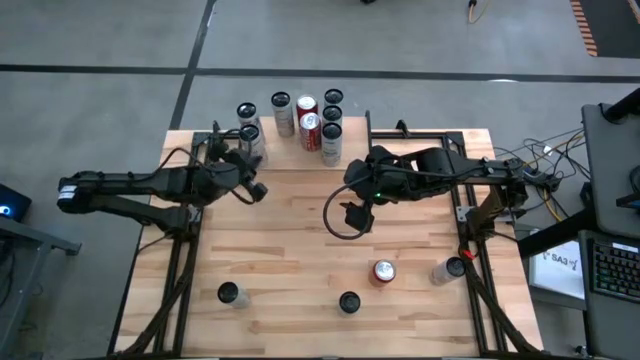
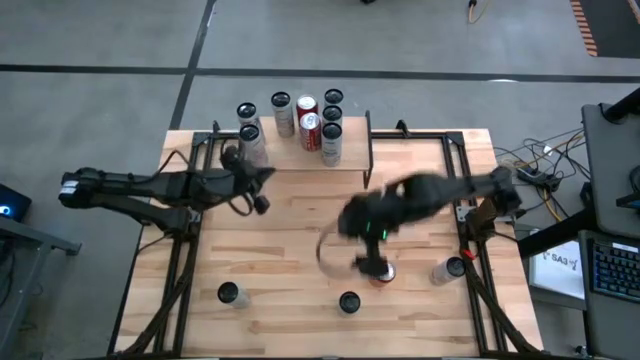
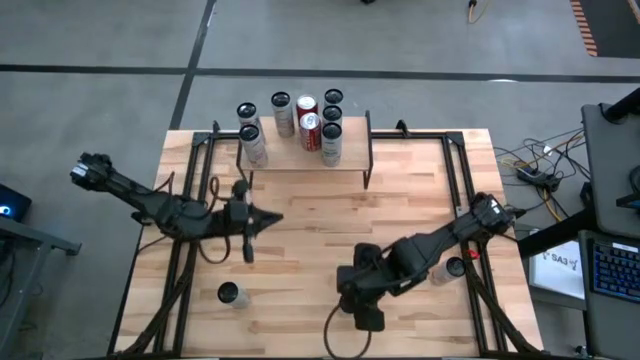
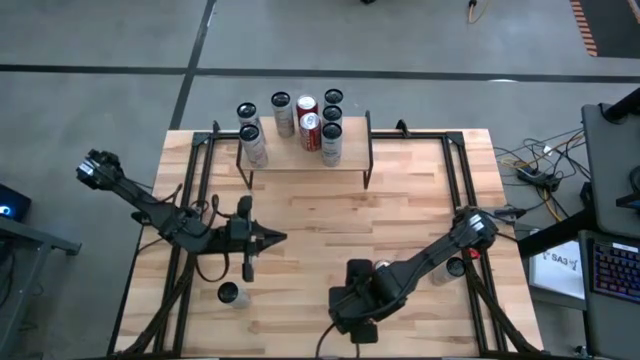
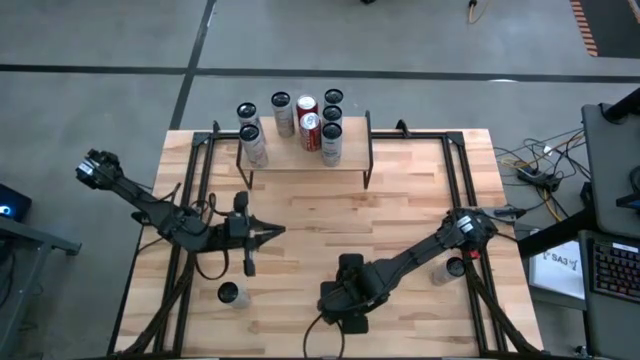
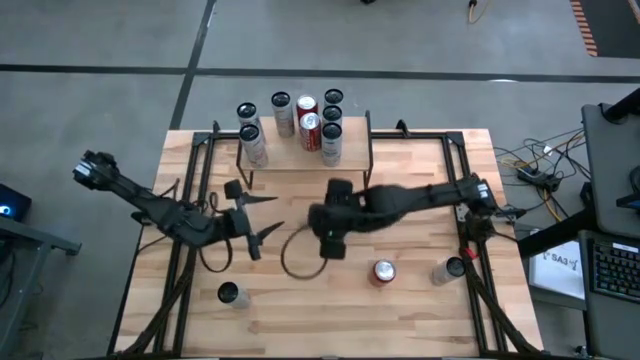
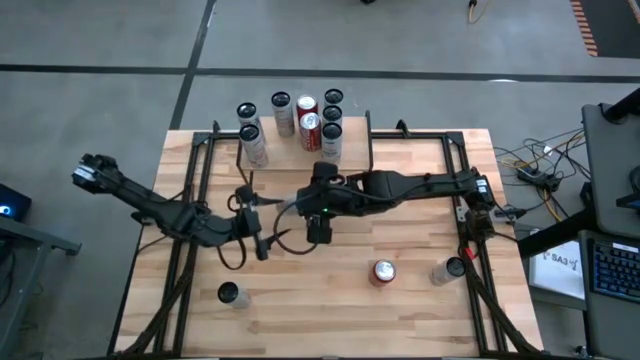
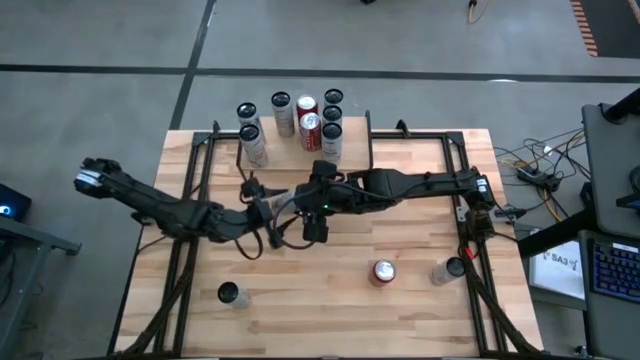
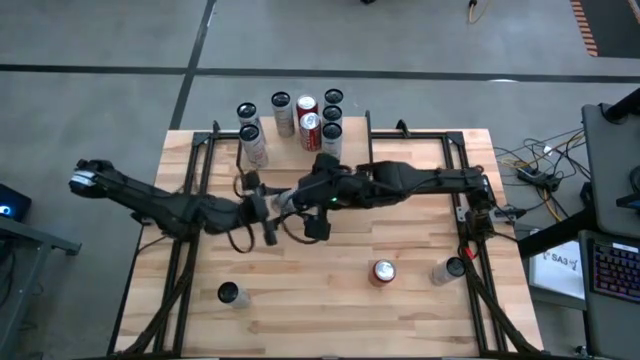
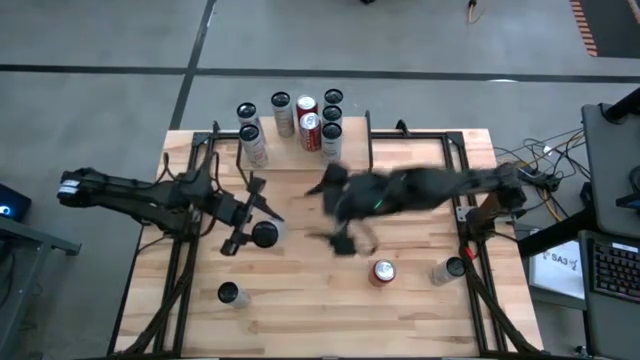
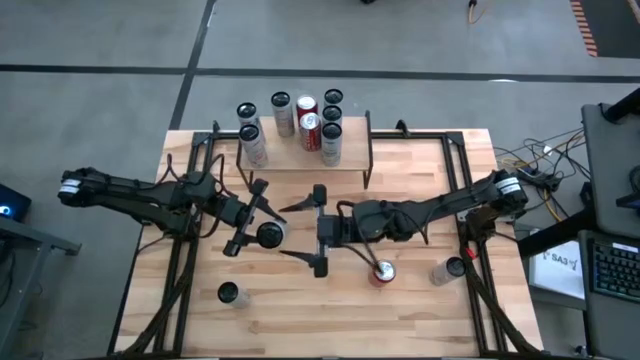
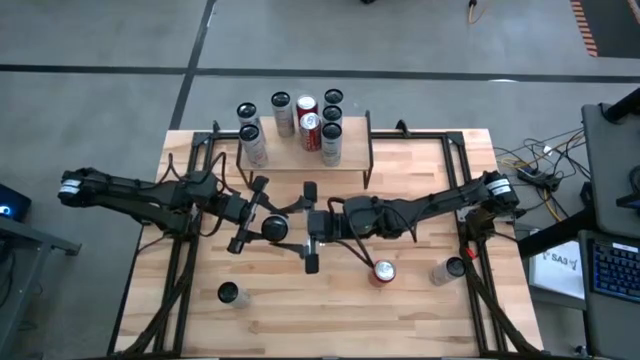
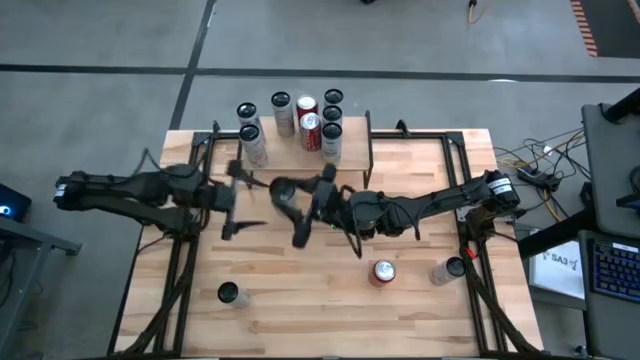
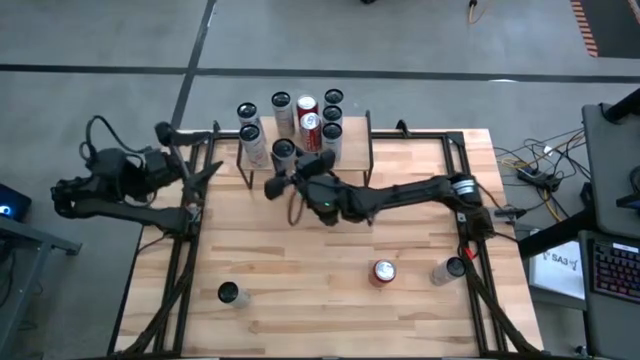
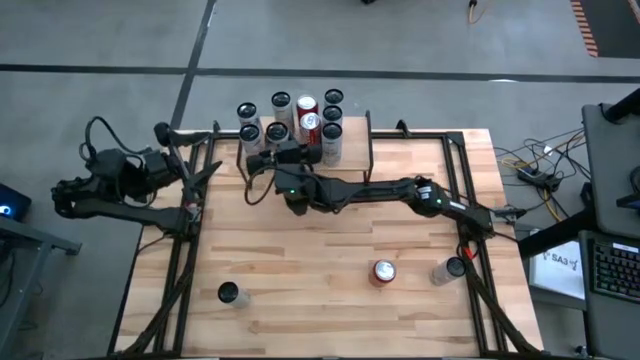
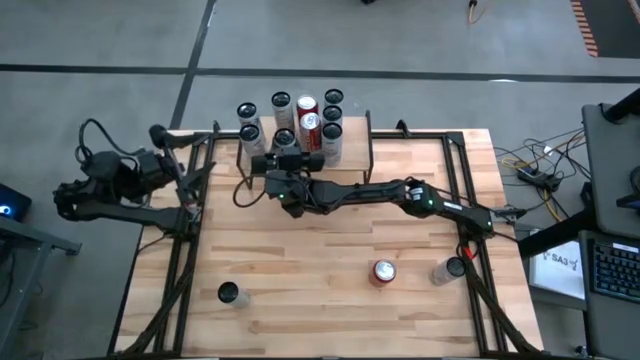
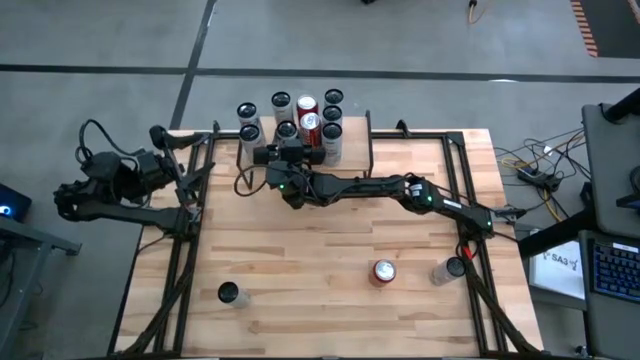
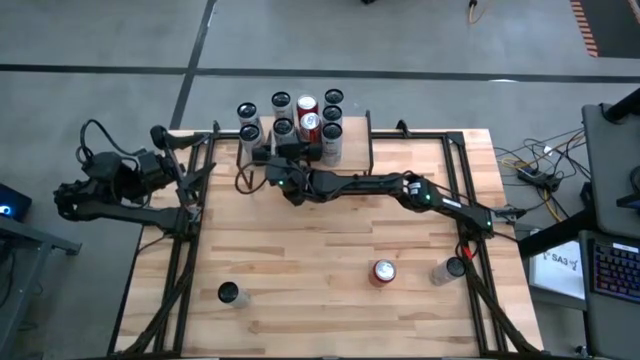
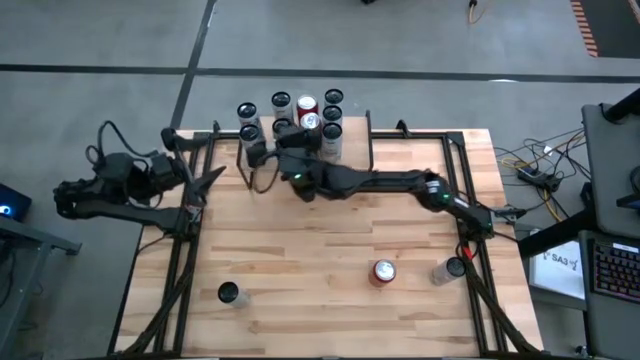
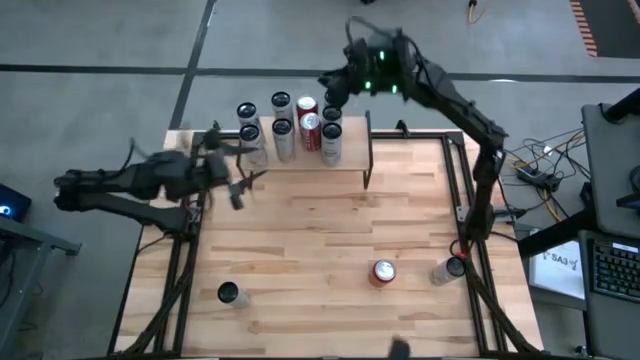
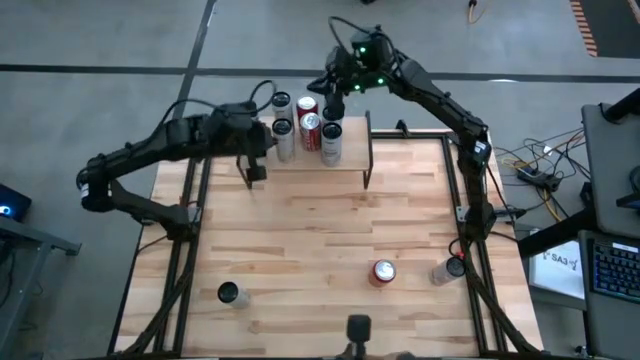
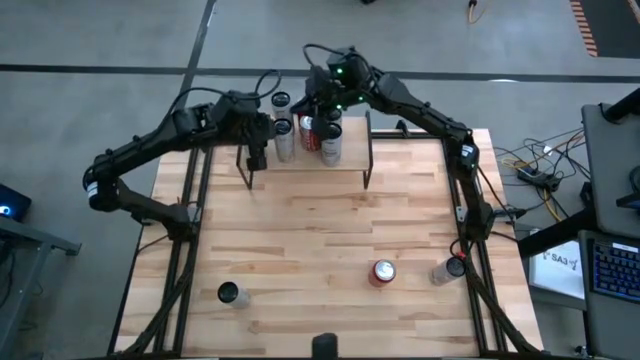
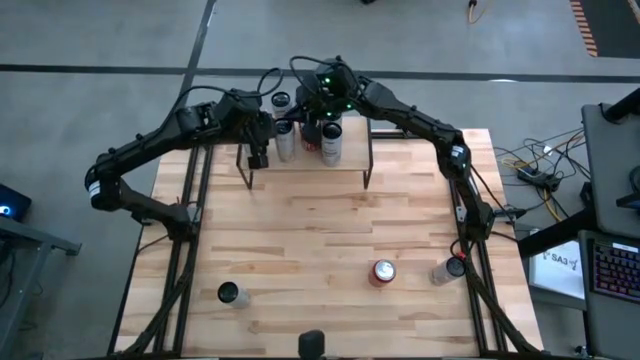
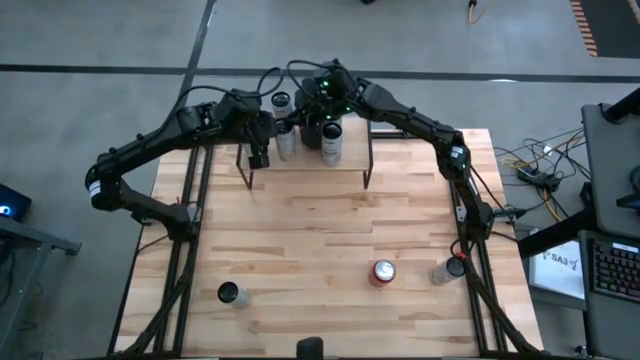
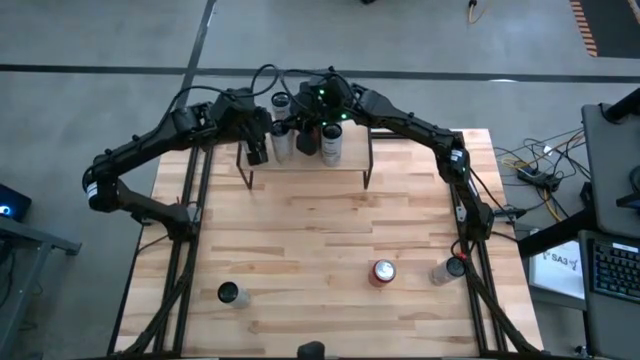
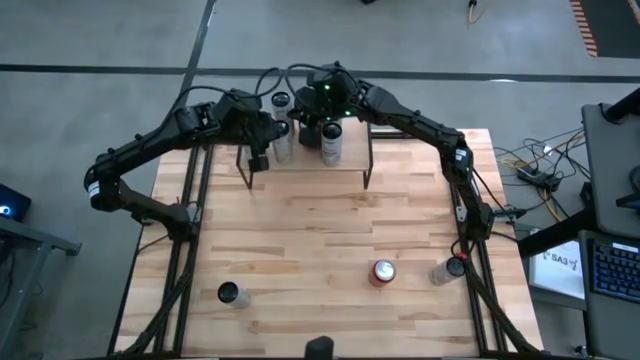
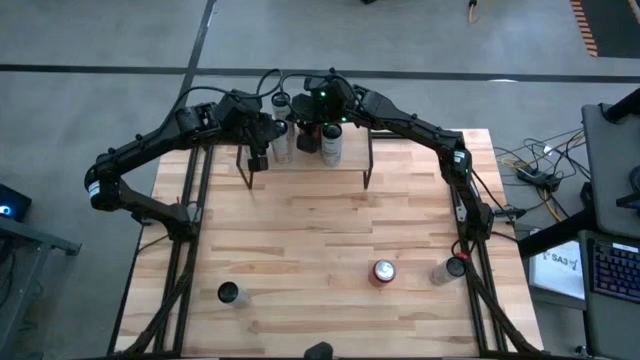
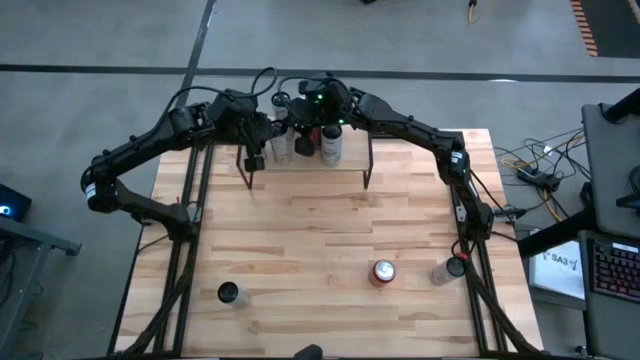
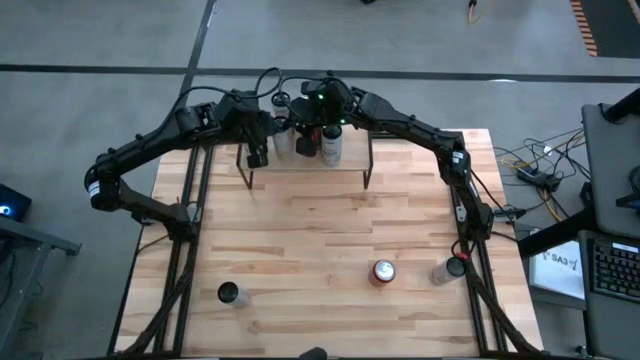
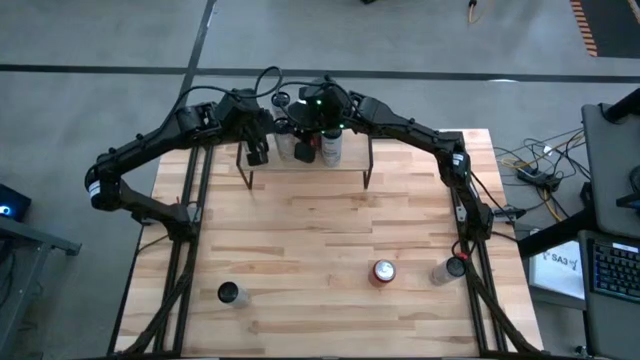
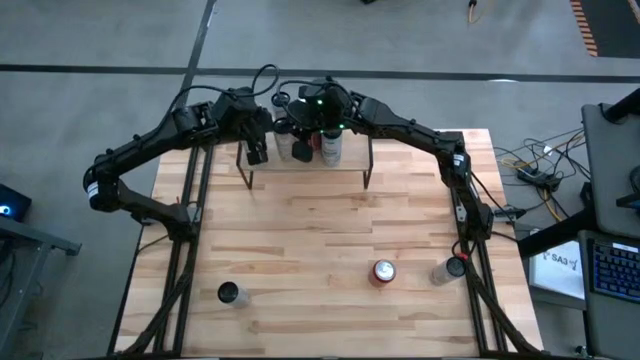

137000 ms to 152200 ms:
Task: Place canned beverage on shelf
Put the white soda can aligned with the other white soda can on the shelf

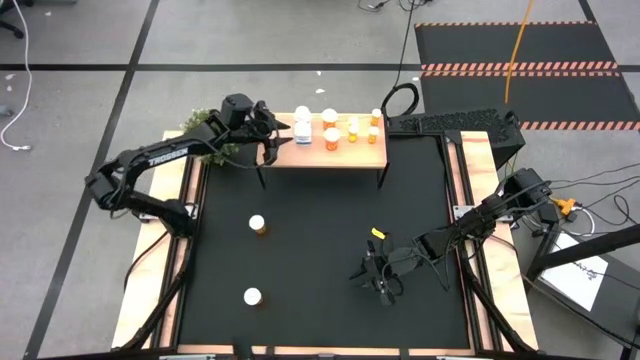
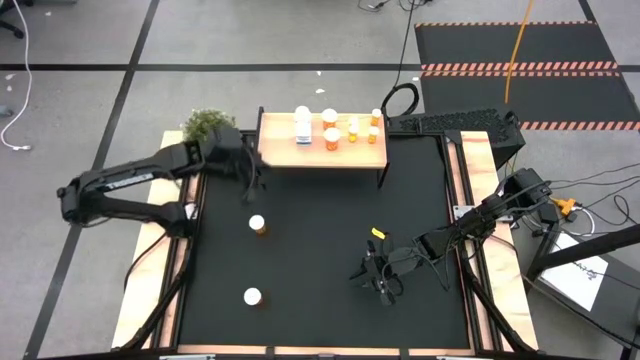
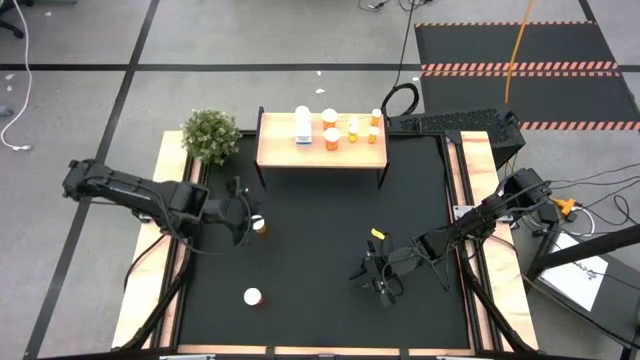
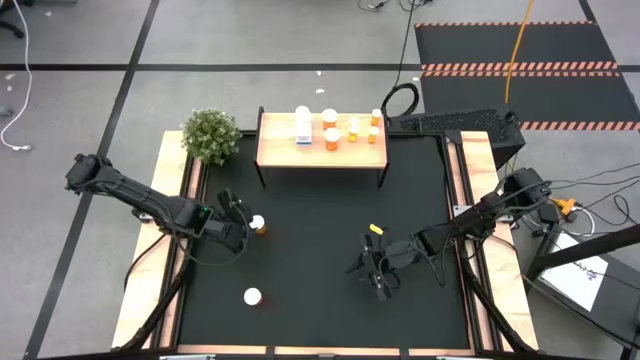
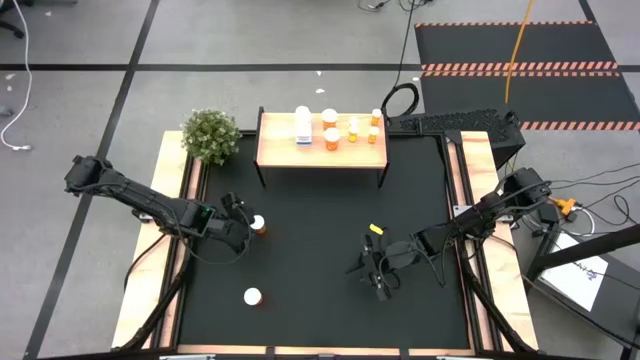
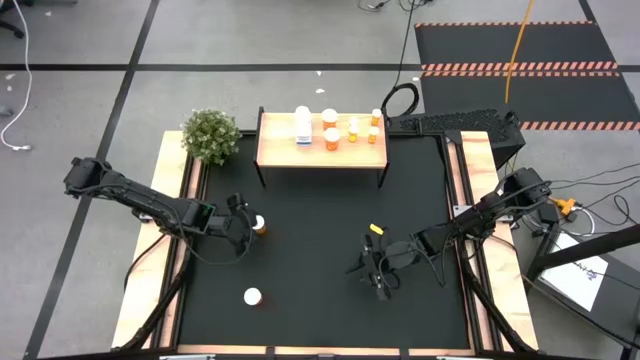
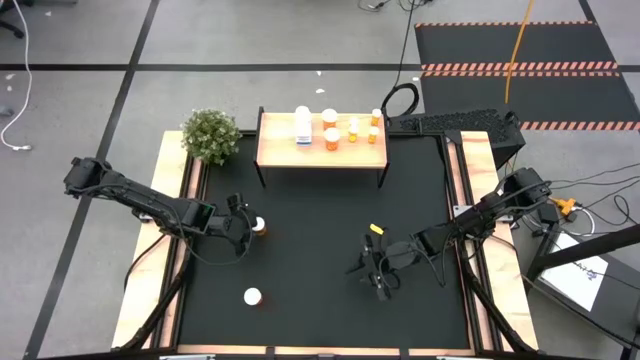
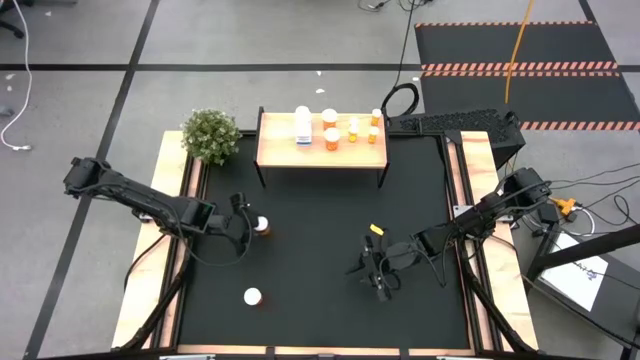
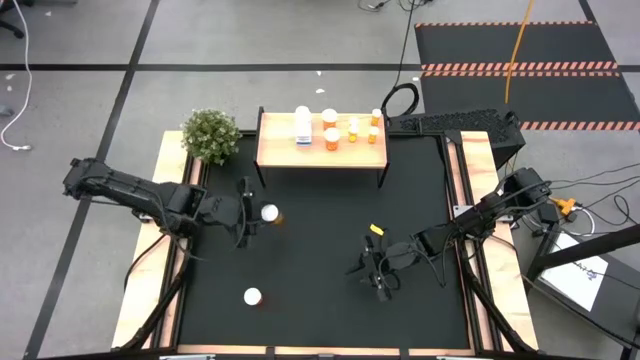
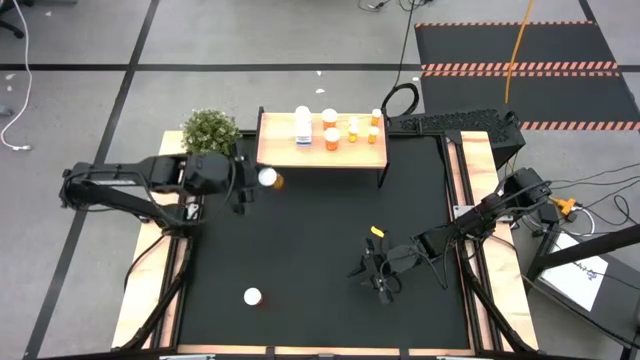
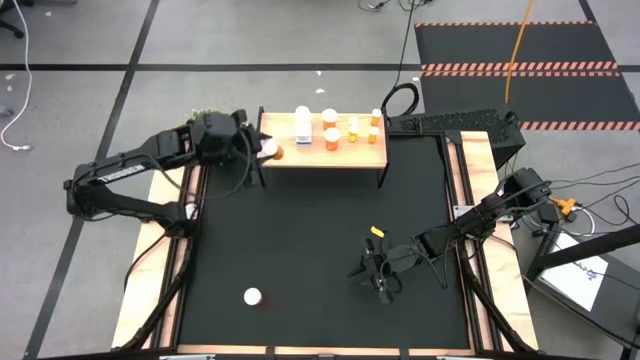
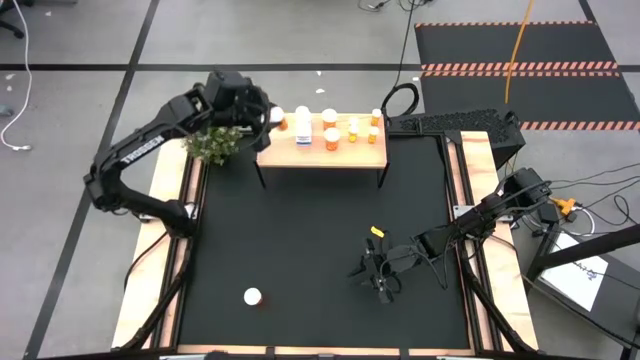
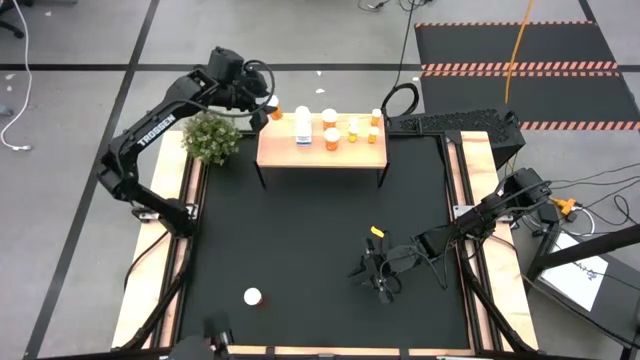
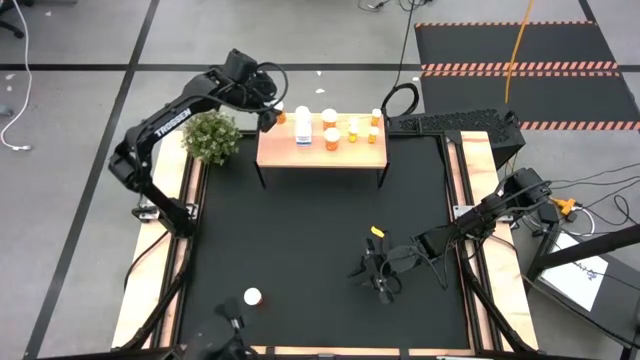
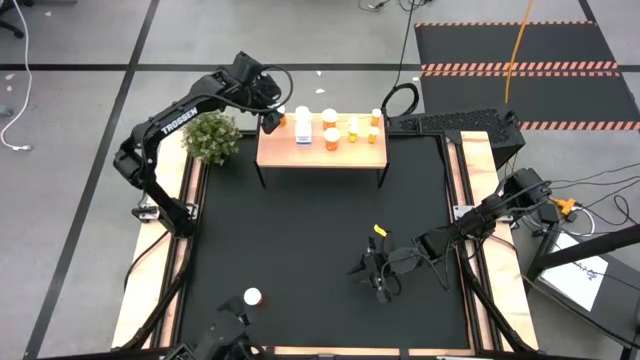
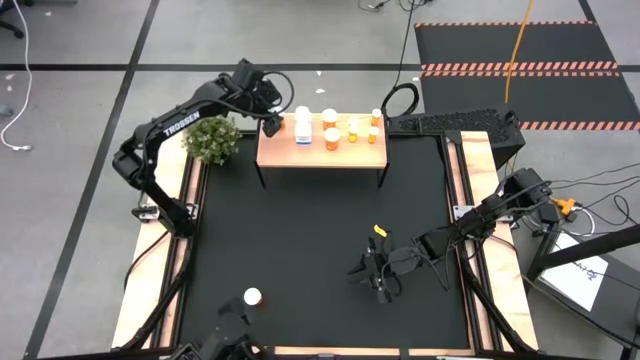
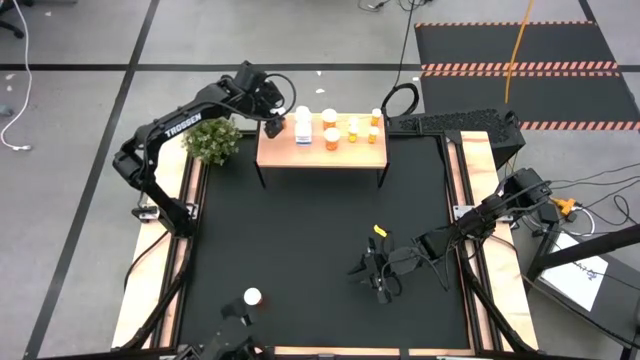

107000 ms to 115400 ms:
Task: Pick and place medicine bottles onto shelf by color
Put the large orange pill bottle on the shelf
